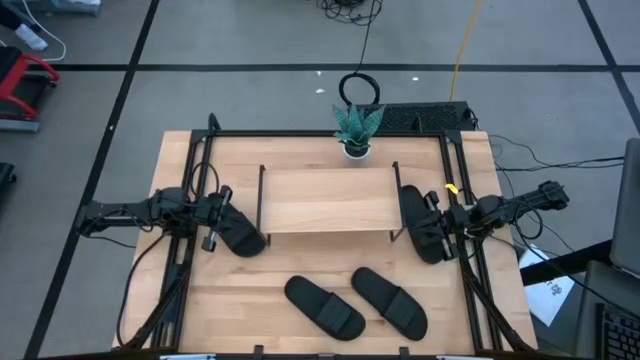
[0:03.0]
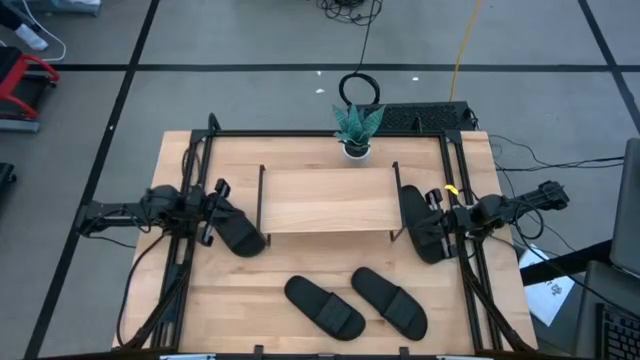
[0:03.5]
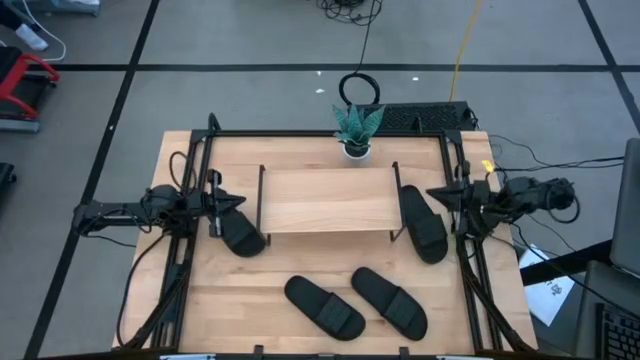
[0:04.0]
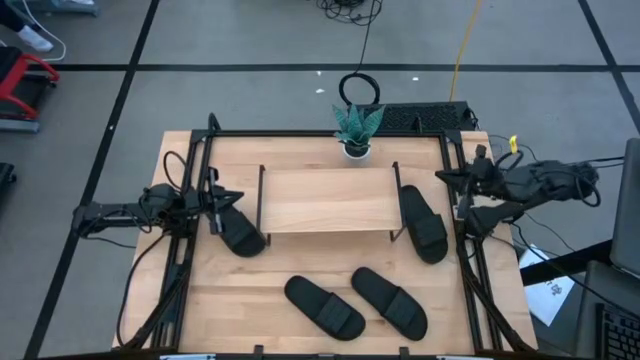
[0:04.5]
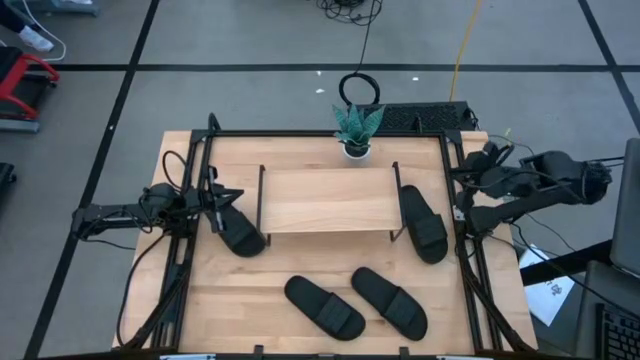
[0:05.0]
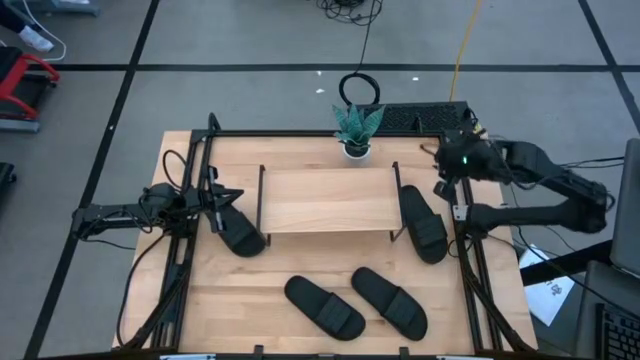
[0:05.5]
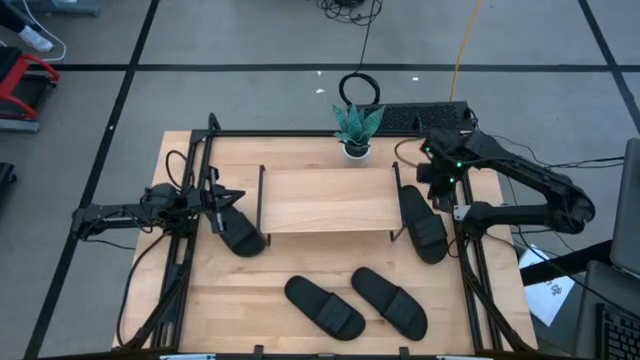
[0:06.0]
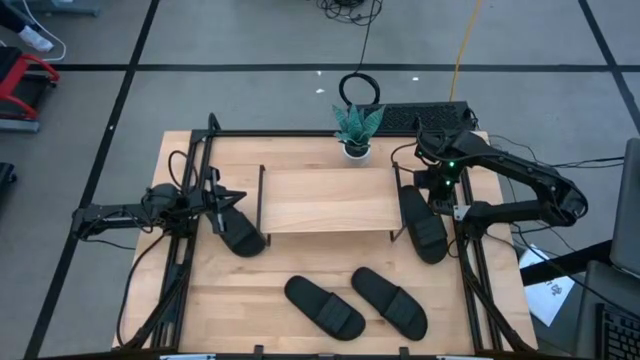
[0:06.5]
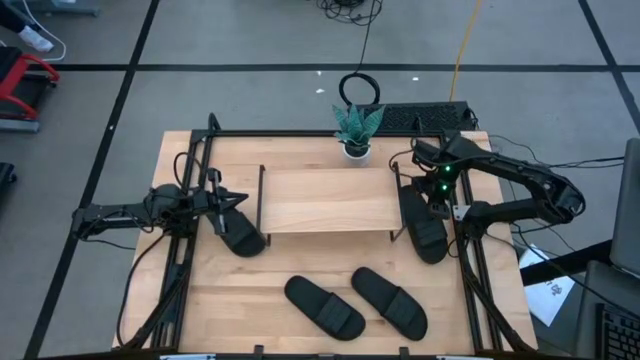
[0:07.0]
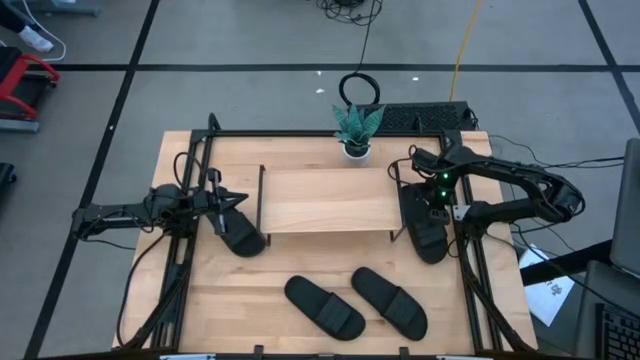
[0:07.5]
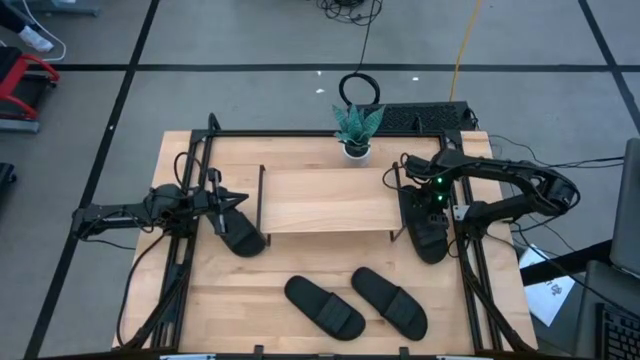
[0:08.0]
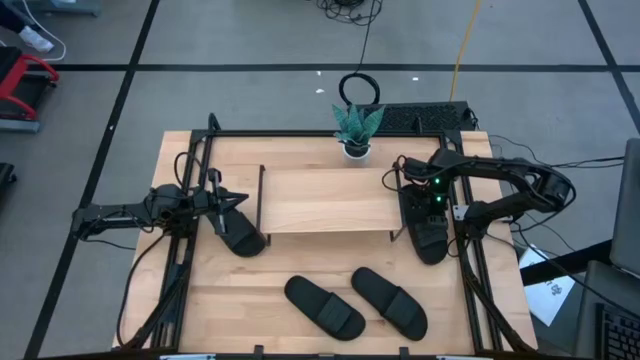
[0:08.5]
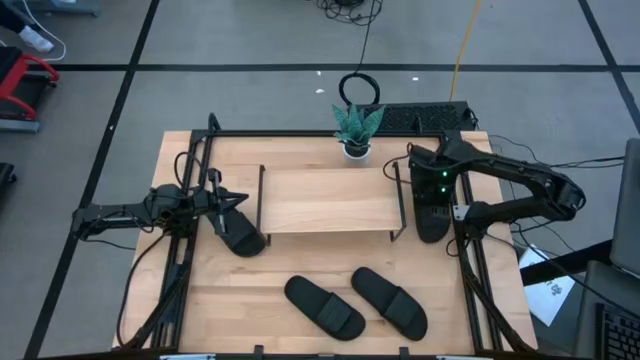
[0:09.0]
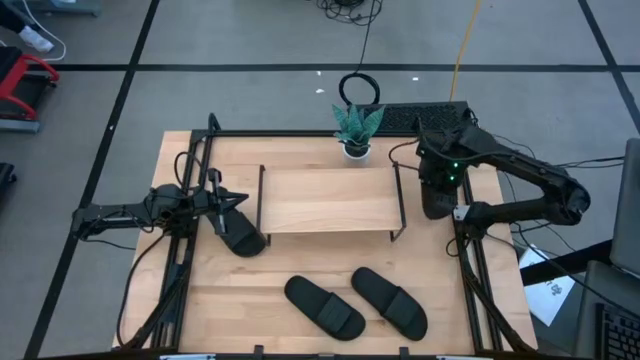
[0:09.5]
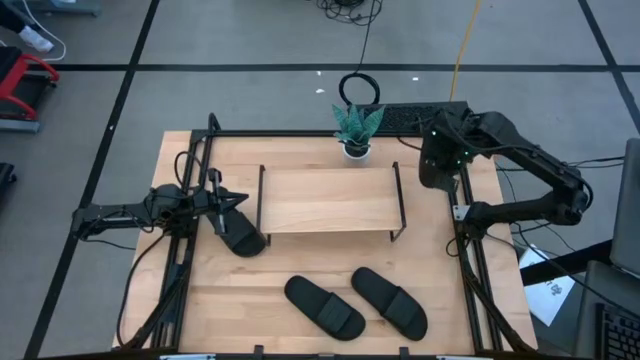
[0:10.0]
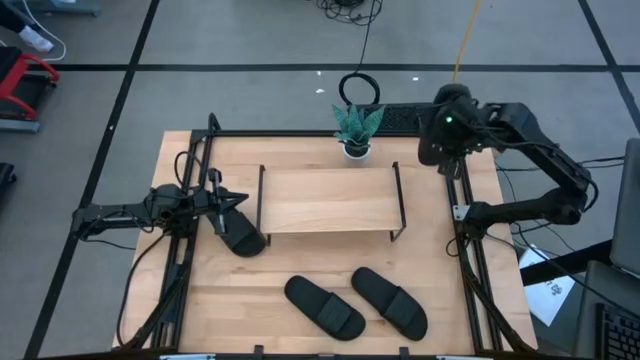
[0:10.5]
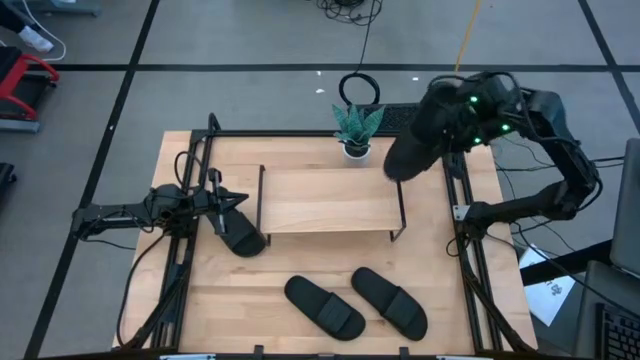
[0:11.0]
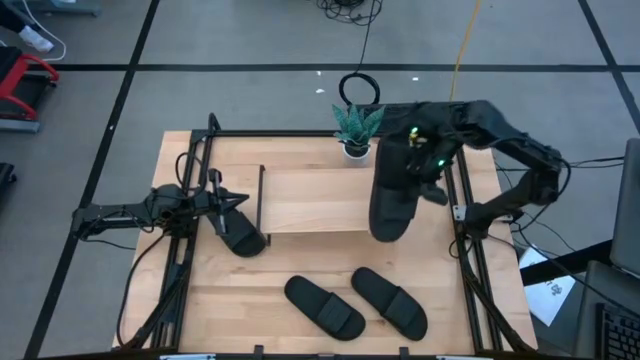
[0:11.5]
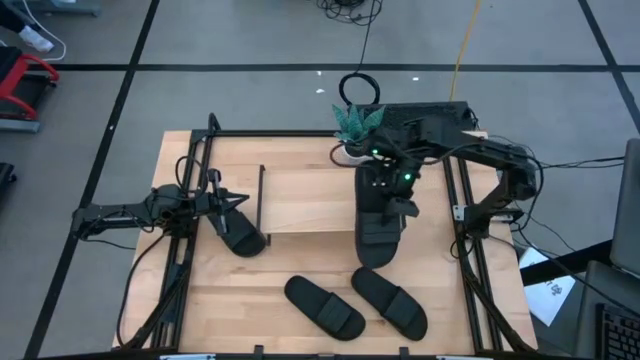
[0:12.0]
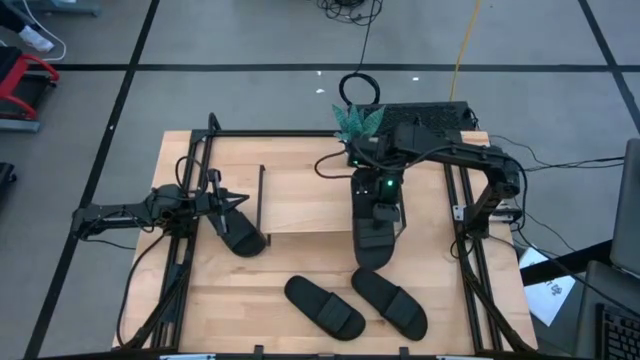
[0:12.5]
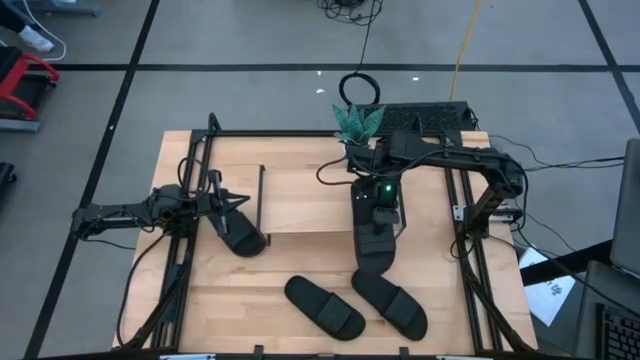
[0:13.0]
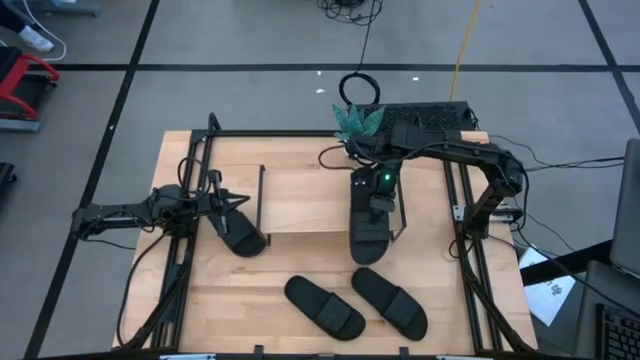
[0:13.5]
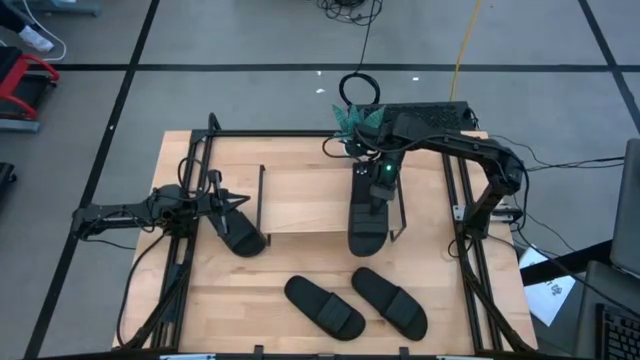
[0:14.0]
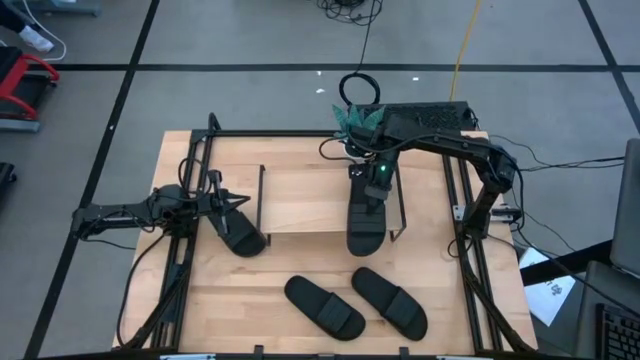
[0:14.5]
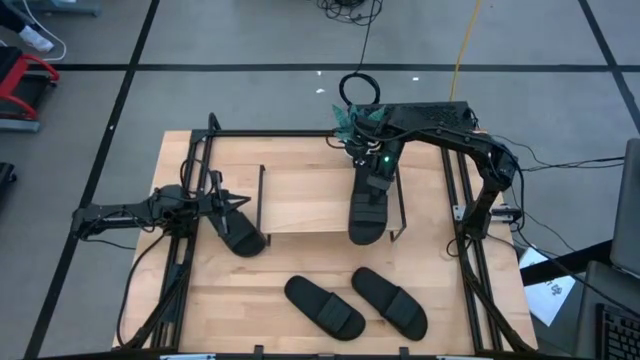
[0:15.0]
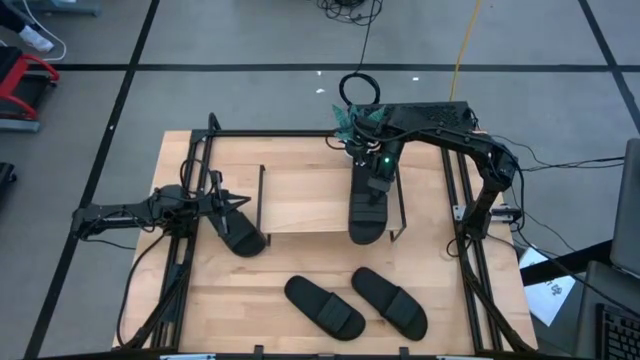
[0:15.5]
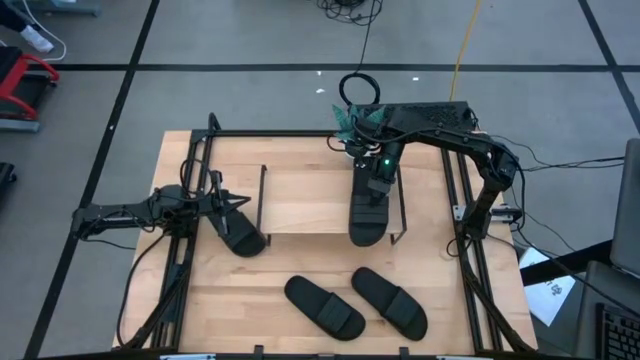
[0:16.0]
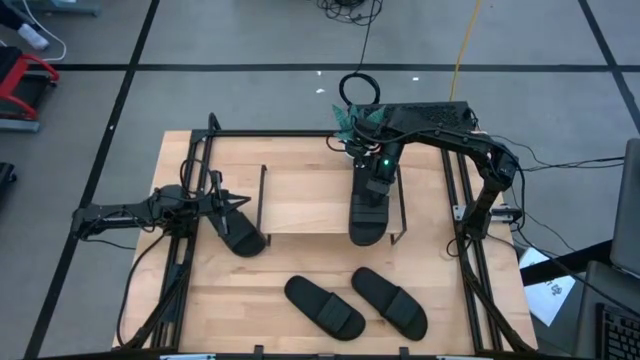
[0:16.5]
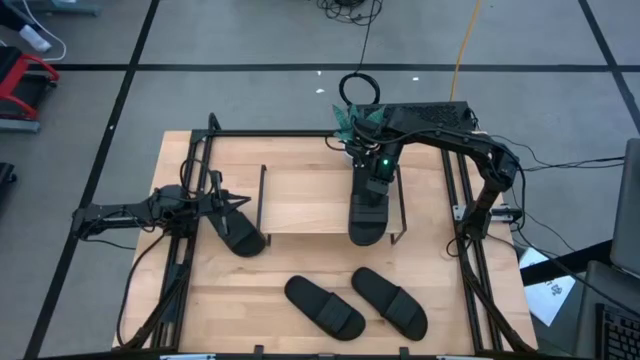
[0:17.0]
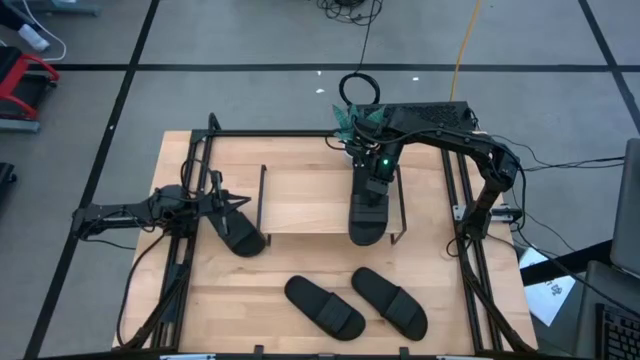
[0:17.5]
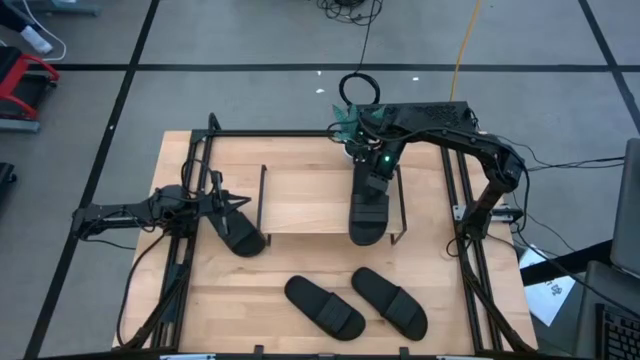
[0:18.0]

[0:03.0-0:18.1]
Task: Pick and place slides into the shelf
Put the black slide on the shelf

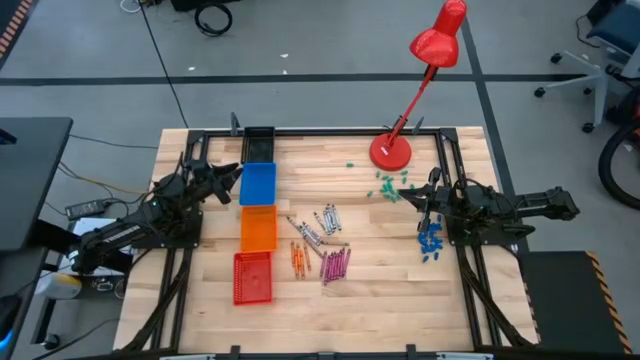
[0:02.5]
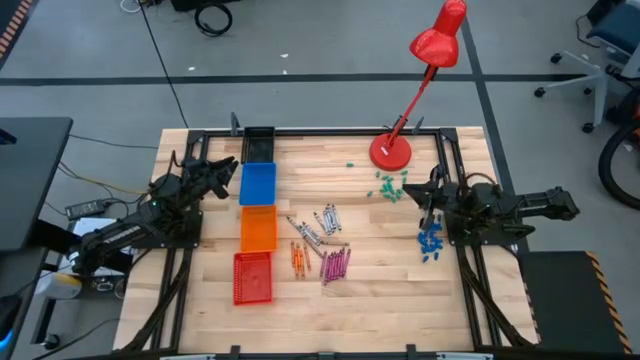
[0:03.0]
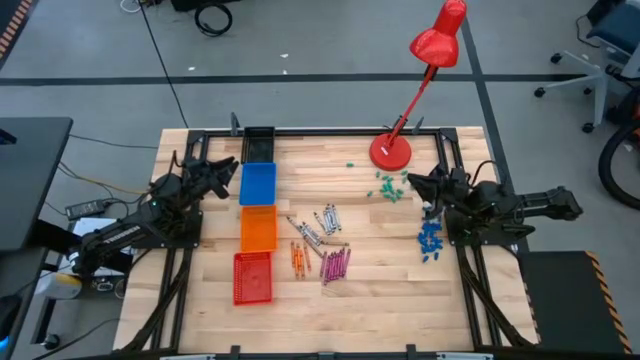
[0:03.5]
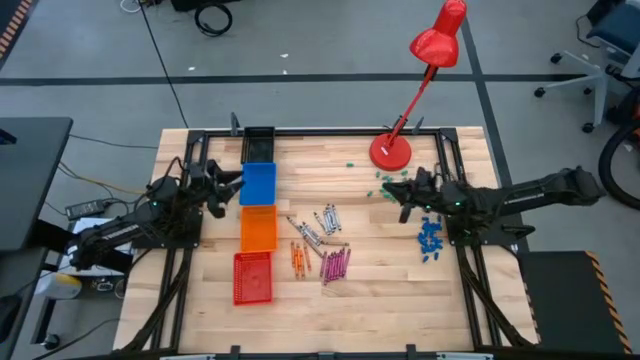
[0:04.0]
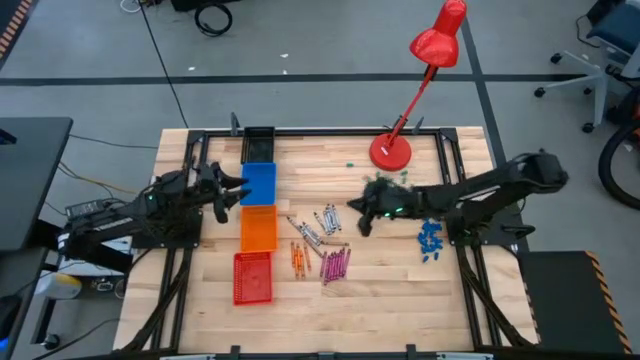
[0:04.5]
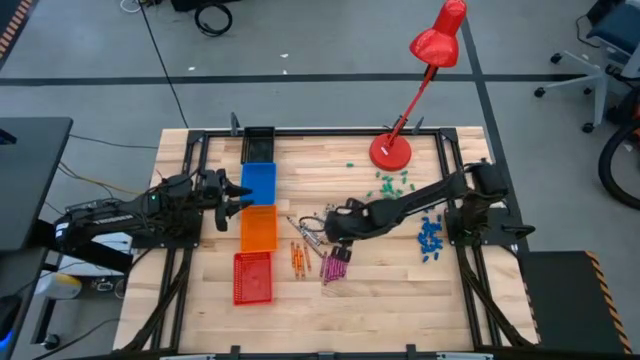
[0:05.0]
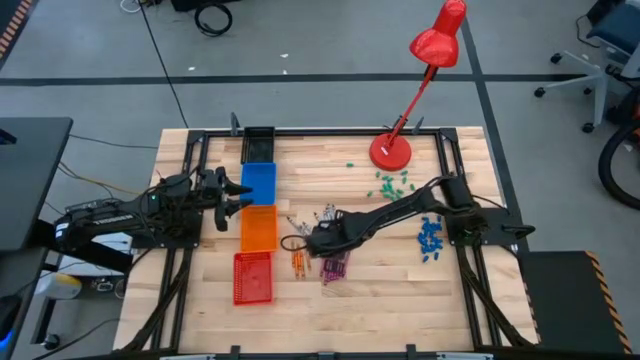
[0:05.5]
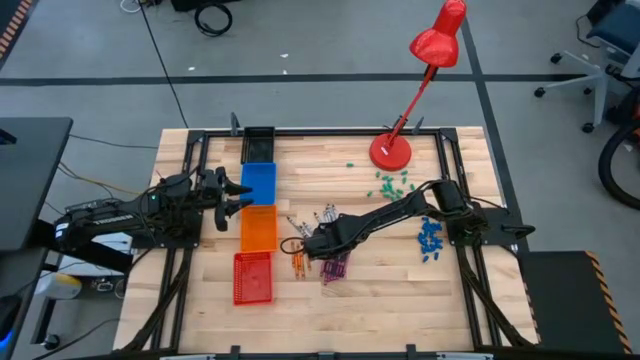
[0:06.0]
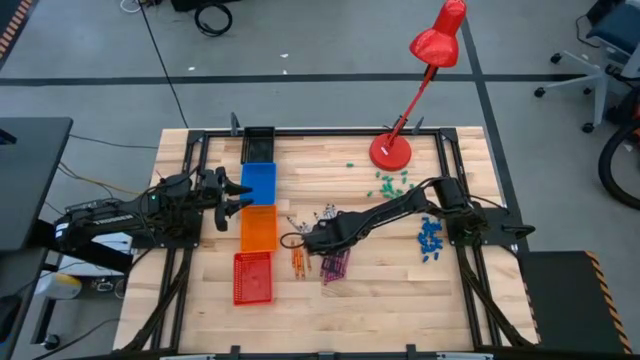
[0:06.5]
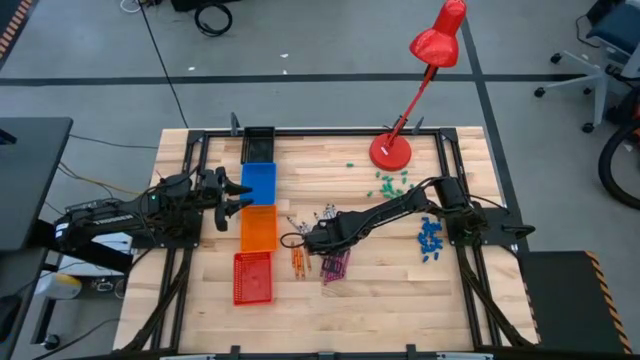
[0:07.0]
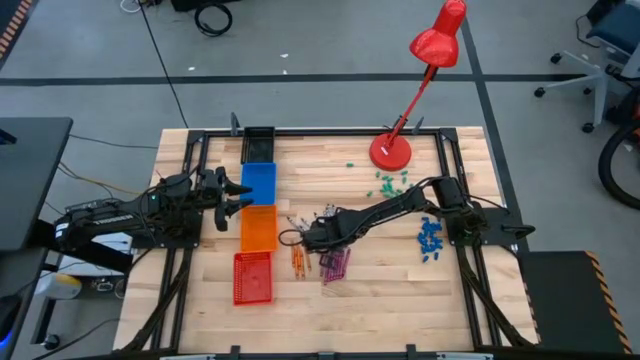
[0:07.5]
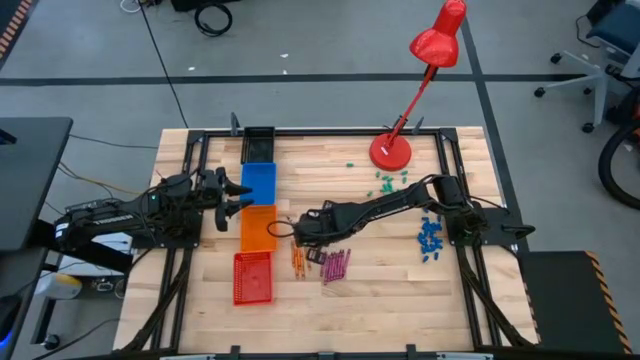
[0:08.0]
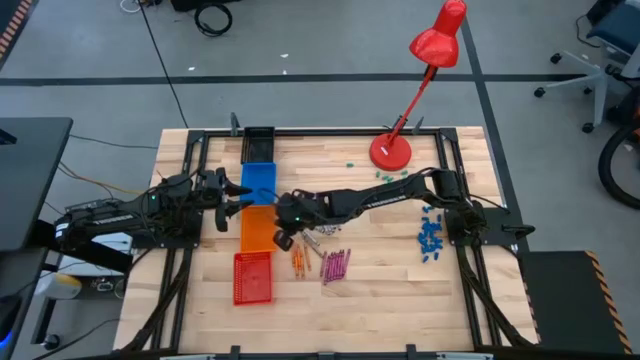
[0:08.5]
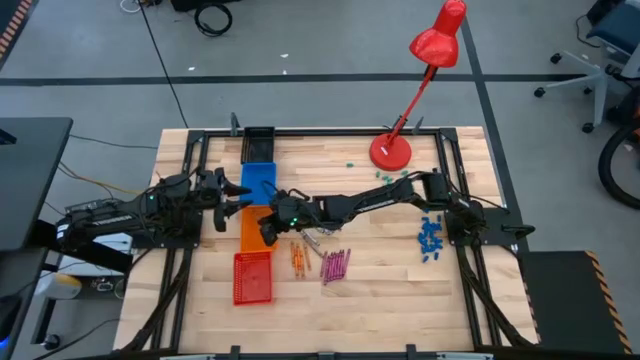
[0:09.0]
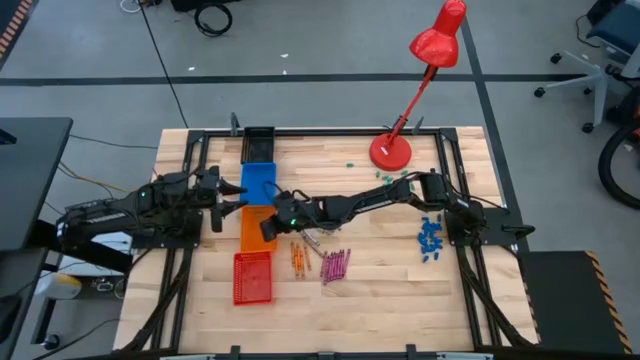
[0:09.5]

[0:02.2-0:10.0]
Task: Sort crayons
Put the brown crayon into the orange bin
